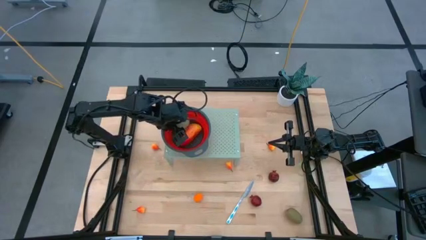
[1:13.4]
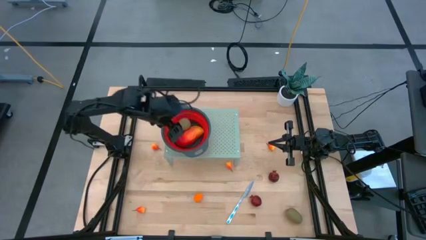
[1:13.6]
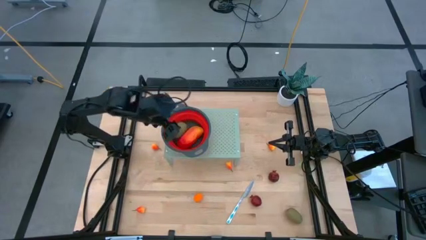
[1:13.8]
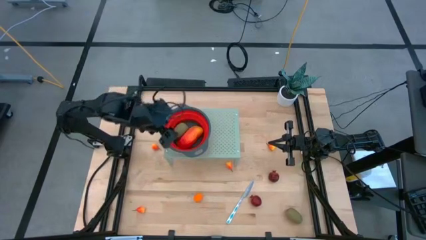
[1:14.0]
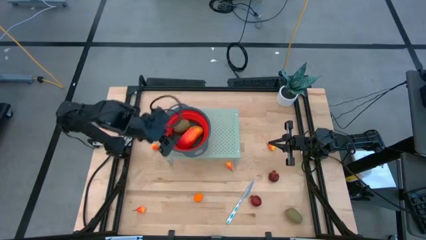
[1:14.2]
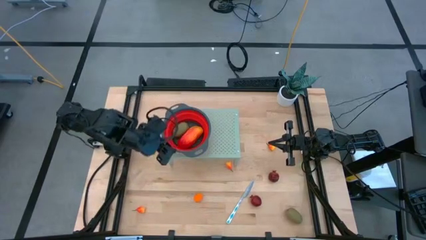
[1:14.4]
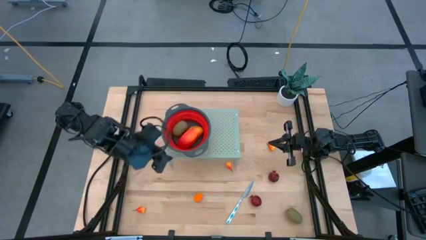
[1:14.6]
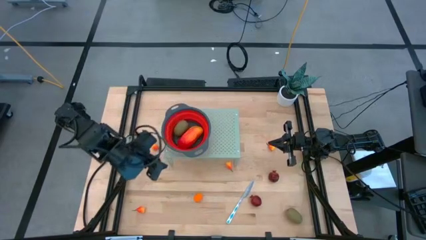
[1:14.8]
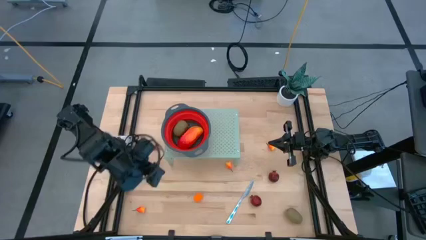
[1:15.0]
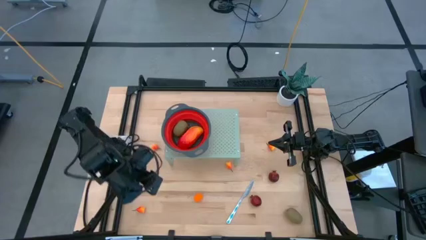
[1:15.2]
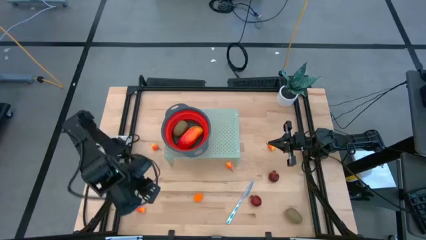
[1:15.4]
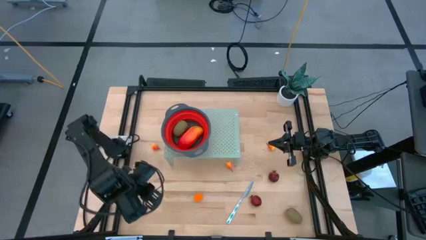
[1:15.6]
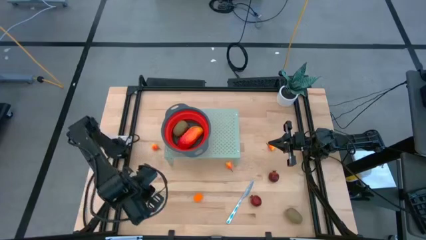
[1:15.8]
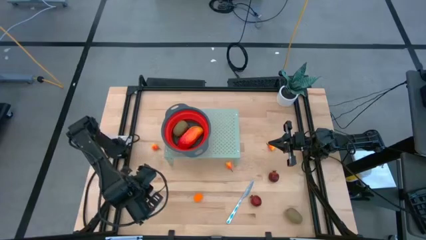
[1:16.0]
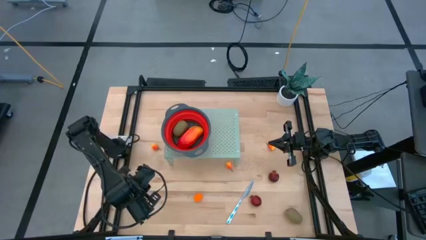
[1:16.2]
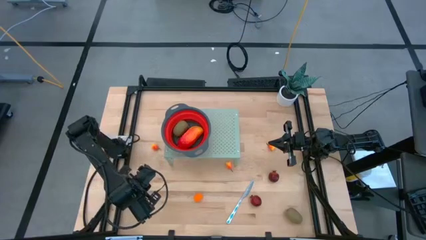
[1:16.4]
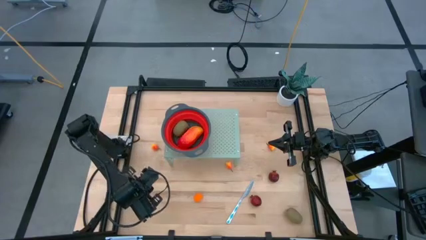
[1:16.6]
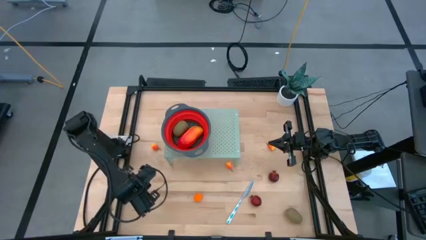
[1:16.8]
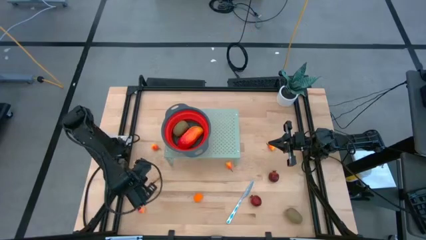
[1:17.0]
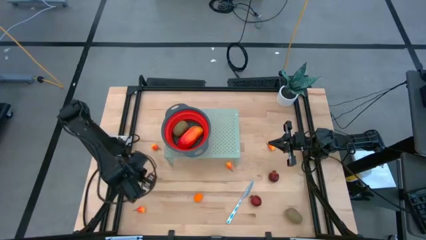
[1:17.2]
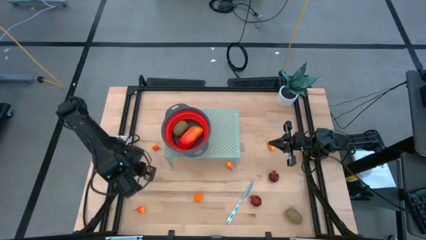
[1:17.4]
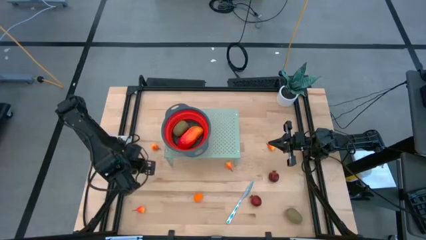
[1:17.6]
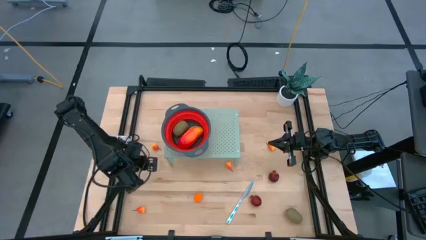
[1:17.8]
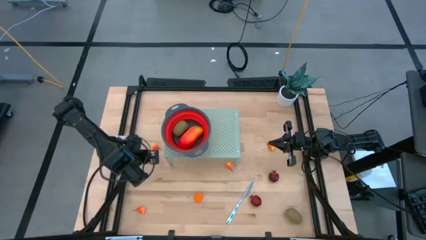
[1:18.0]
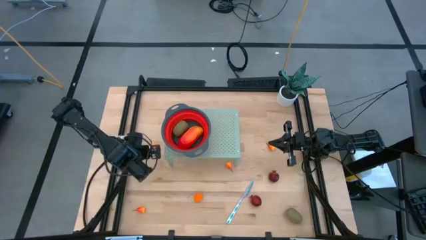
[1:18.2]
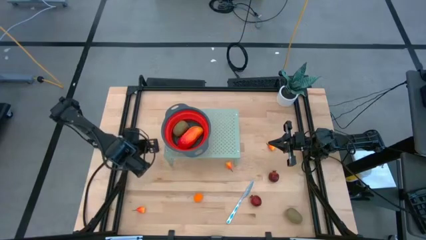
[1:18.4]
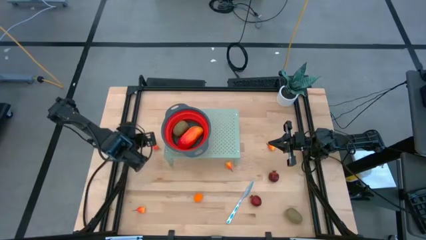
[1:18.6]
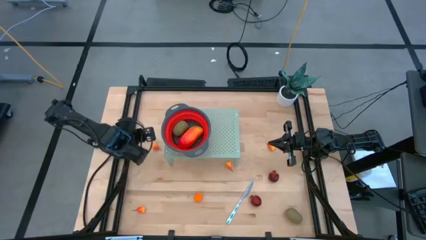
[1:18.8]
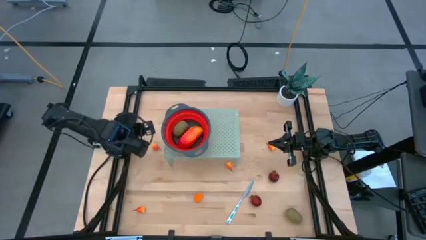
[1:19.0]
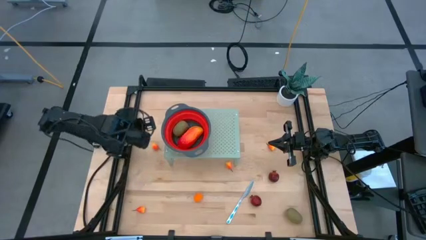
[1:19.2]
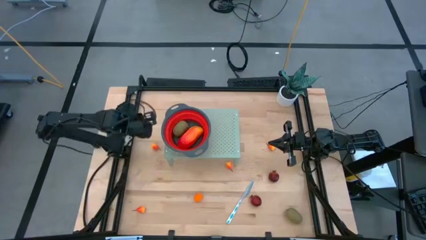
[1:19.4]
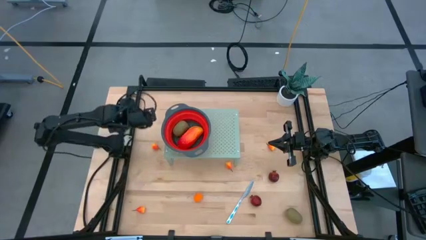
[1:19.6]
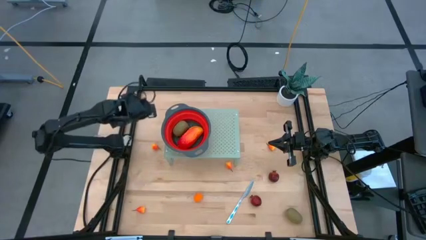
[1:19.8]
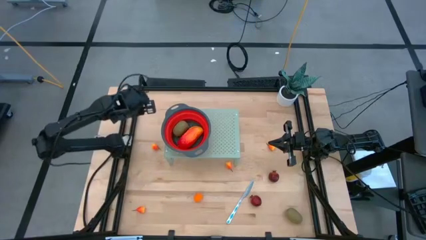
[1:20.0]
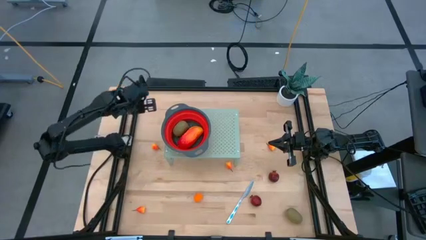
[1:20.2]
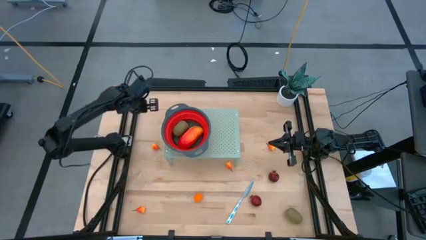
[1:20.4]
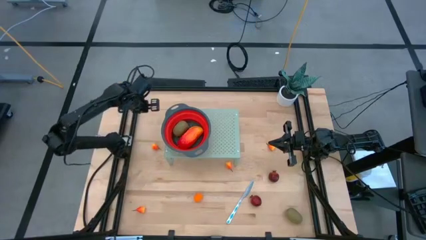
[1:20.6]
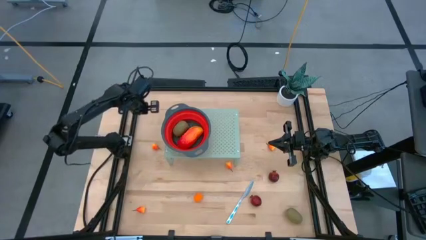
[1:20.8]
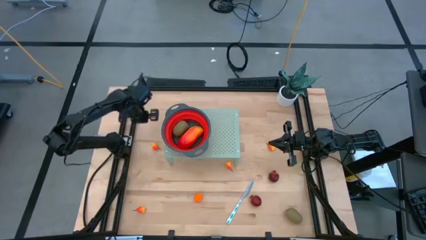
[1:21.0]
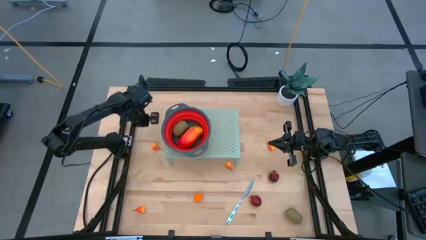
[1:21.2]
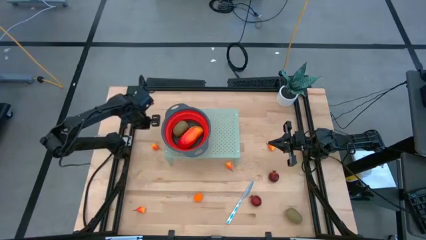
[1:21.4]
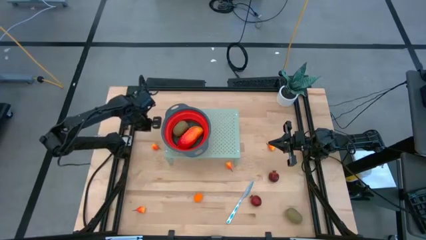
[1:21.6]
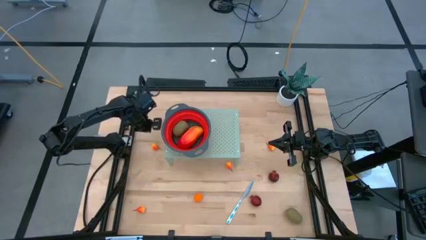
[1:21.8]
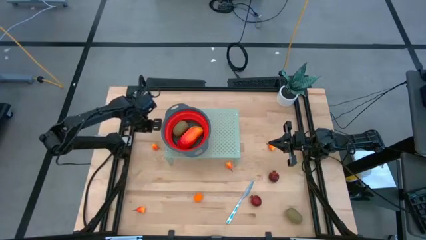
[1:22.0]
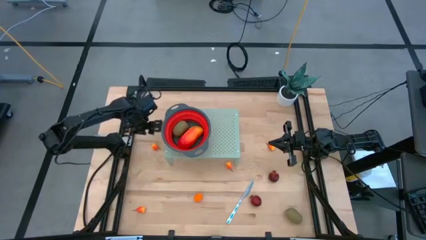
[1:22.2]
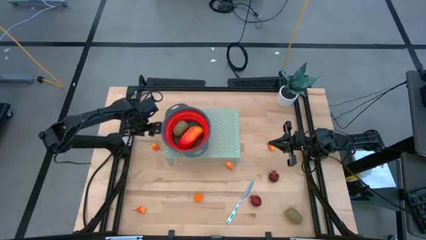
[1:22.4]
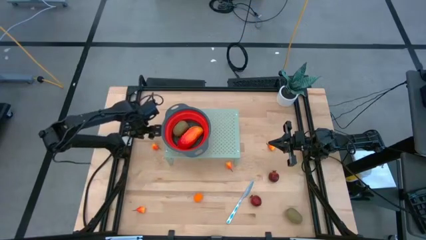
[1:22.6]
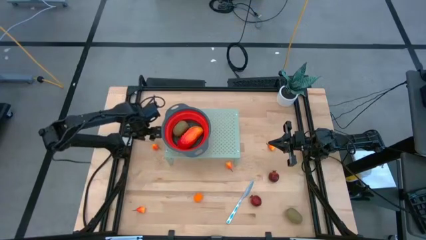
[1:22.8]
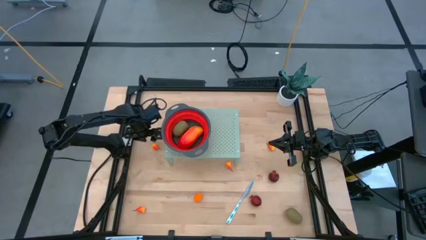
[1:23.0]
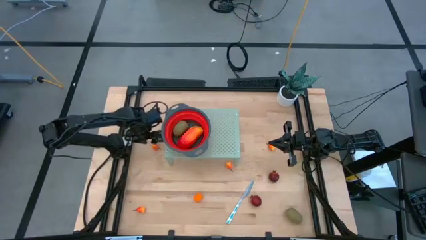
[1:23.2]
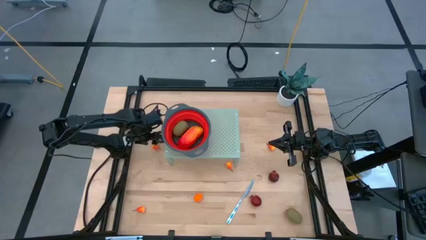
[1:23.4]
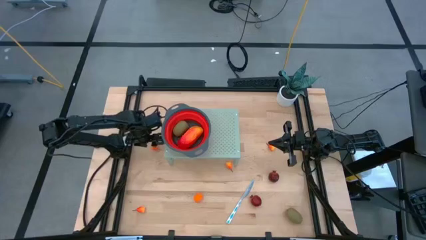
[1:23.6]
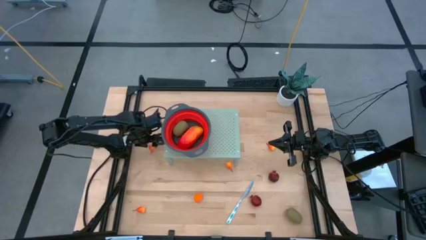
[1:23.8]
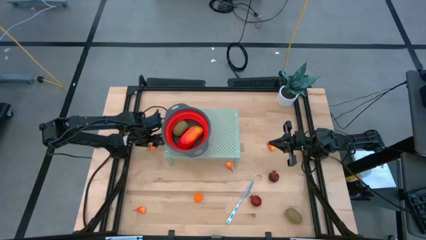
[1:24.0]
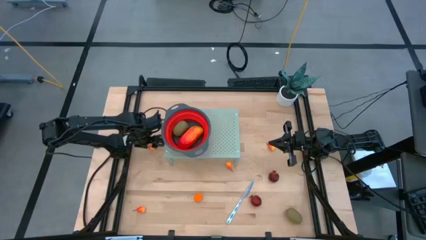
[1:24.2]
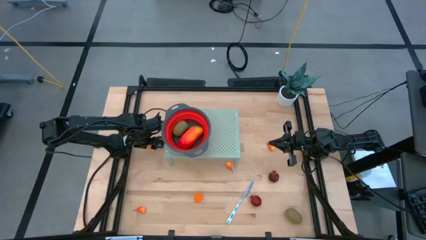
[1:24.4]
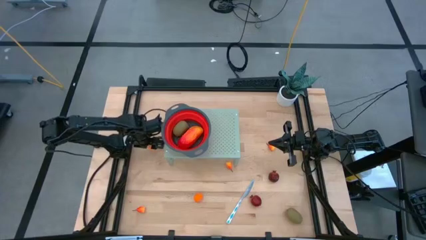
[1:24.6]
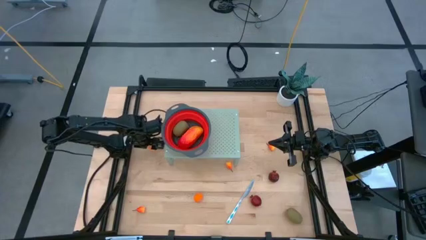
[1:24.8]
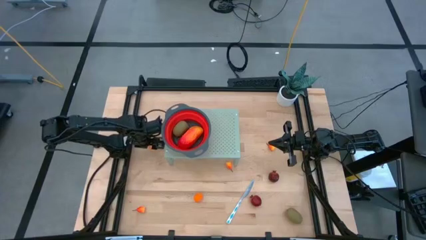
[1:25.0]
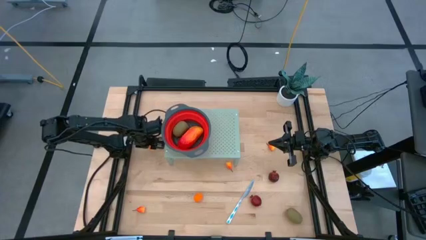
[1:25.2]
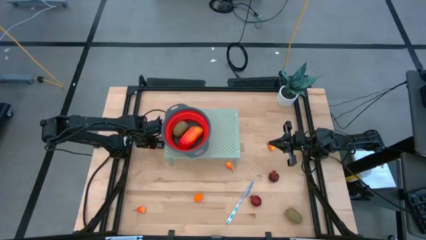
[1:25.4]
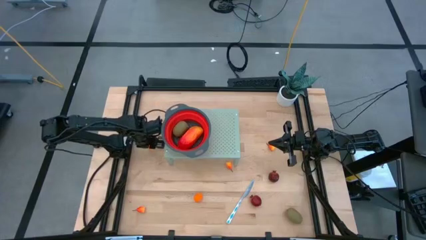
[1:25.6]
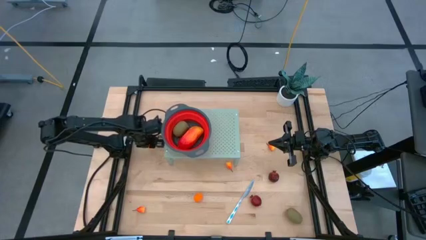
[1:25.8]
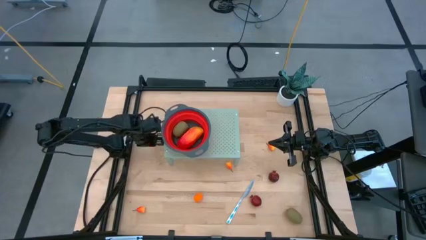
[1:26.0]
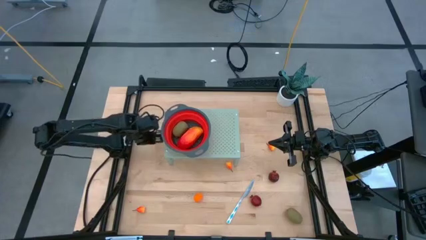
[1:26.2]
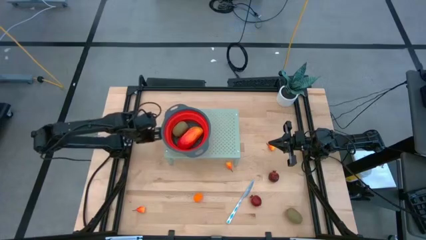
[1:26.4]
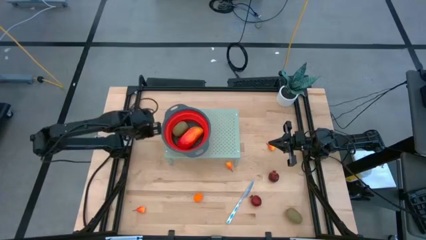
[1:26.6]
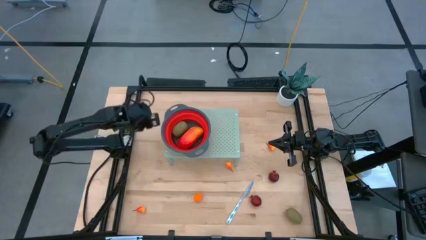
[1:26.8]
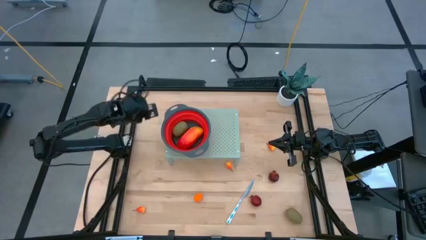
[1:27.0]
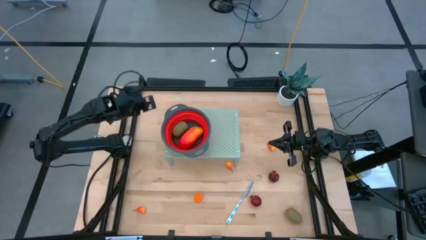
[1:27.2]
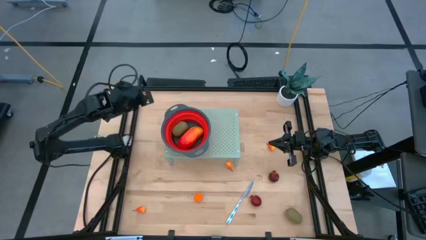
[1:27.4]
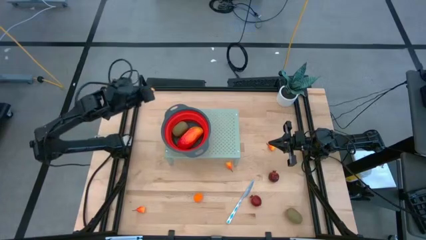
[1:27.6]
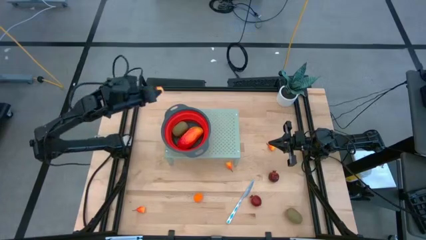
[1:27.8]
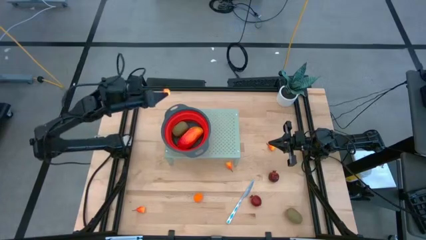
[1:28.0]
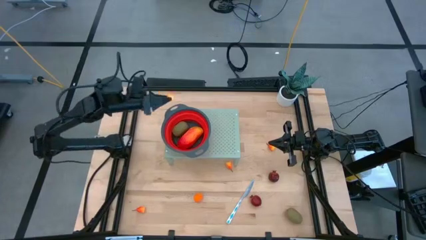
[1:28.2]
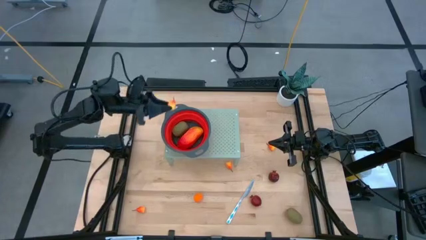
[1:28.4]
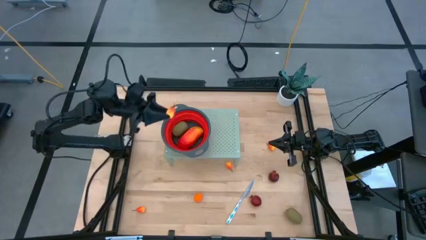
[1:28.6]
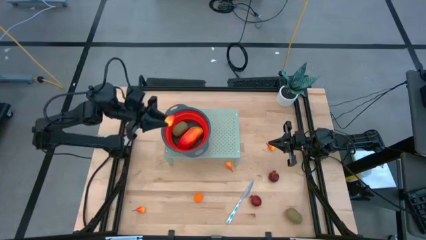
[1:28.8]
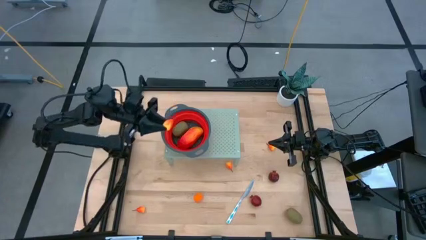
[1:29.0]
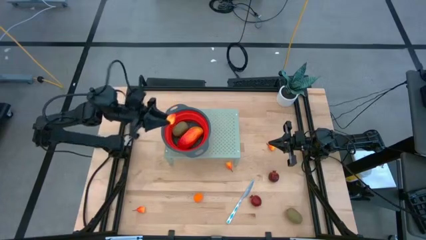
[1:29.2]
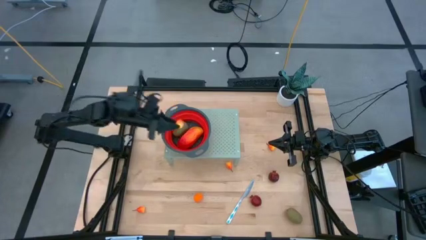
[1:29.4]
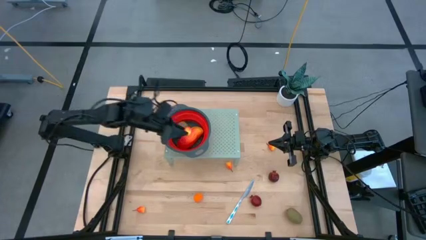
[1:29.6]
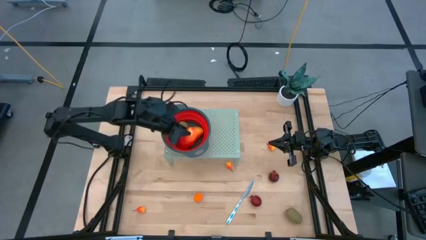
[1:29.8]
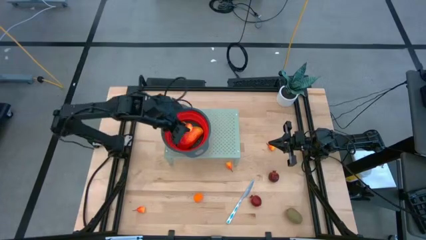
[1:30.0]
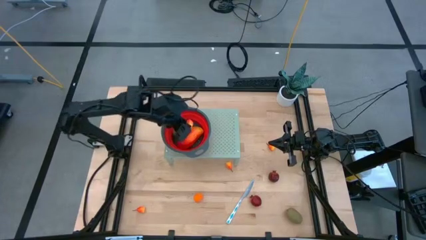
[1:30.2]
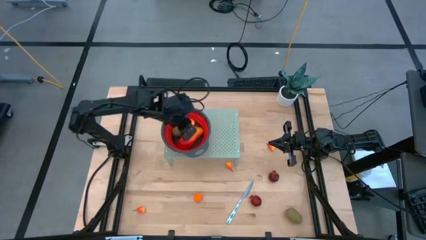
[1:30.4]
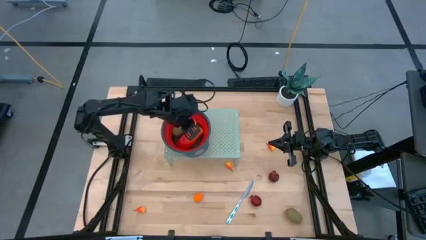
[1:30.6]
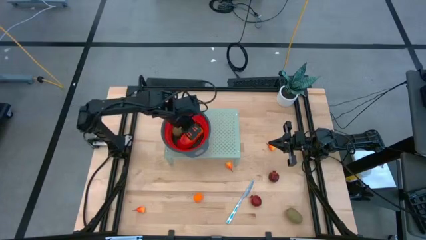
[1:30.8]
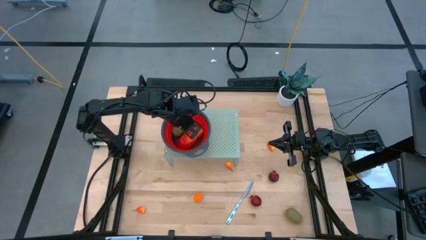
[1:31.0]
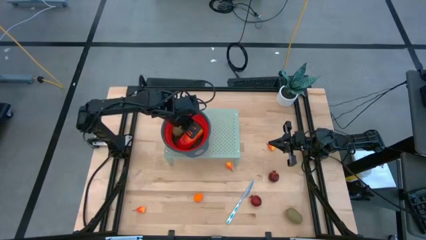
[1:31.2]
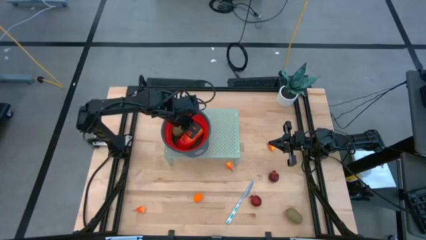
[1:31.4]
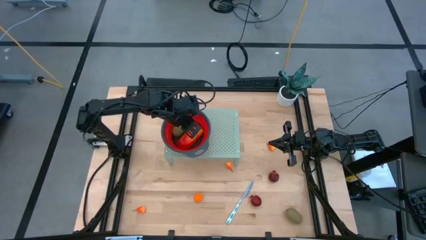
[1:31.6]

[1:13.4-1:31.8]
Task: Pick & Place Fruit
Put the orange pear into the red strainer bowl on the shelf
